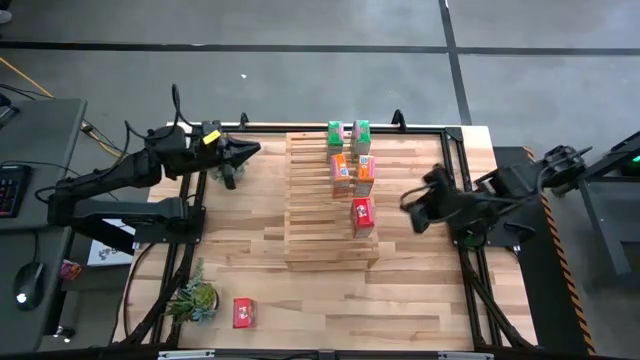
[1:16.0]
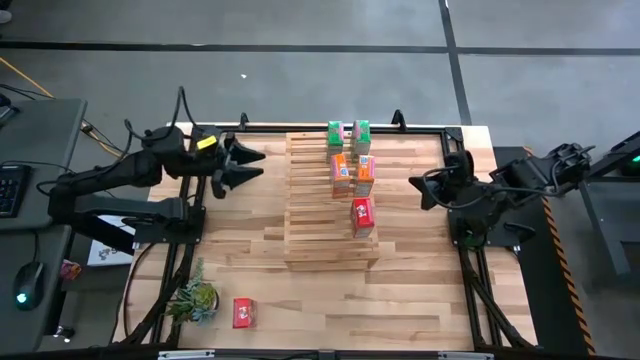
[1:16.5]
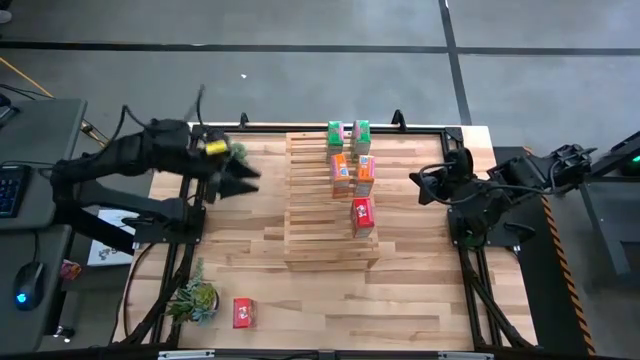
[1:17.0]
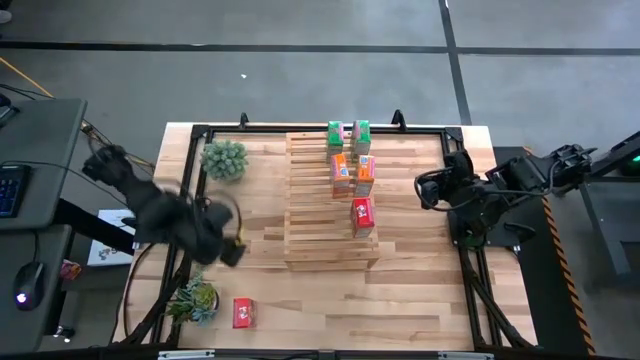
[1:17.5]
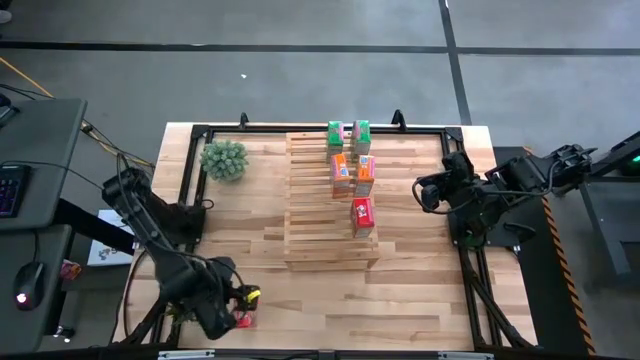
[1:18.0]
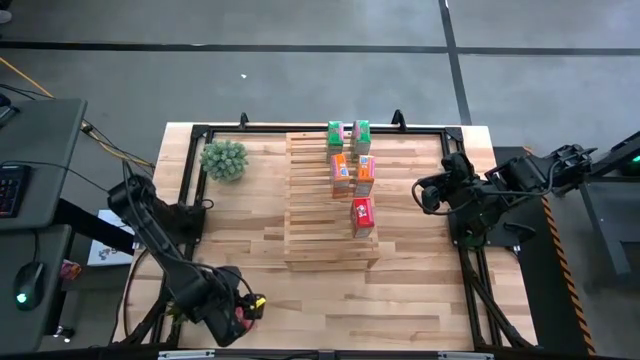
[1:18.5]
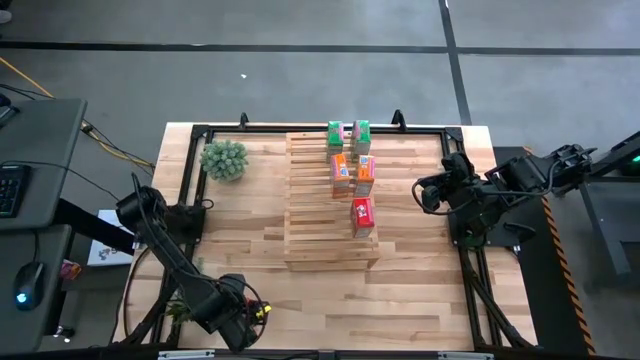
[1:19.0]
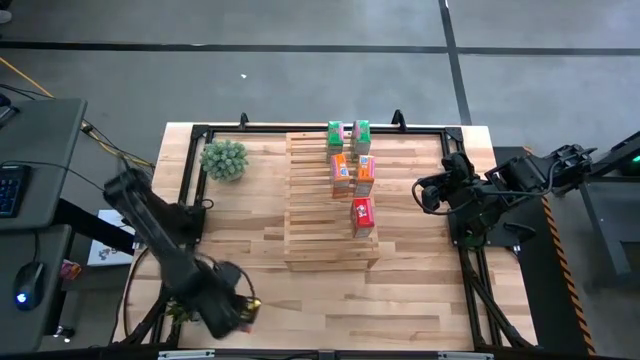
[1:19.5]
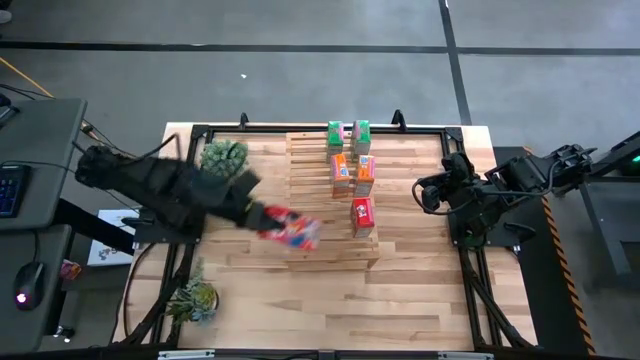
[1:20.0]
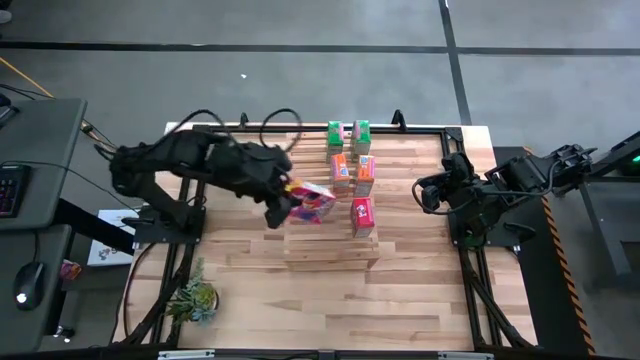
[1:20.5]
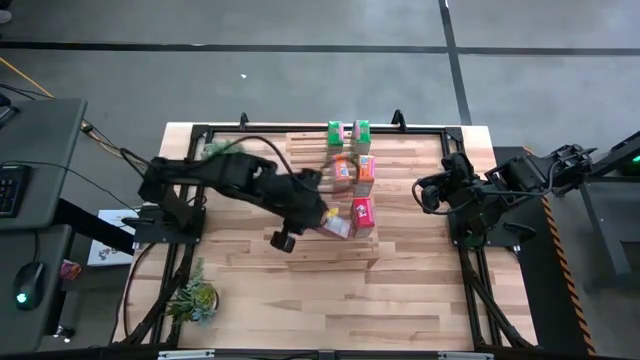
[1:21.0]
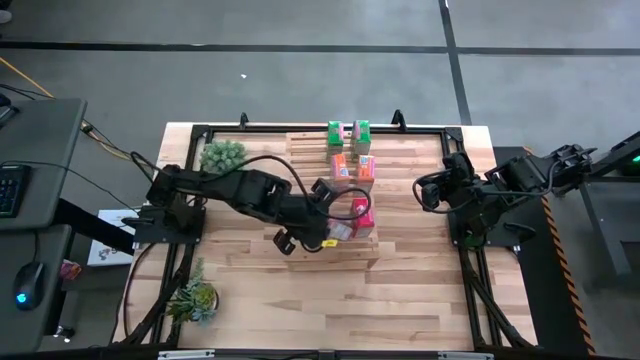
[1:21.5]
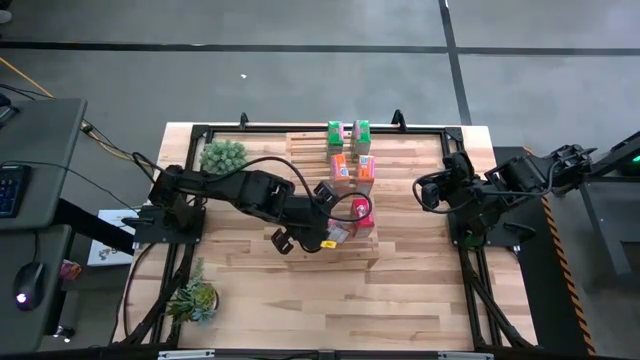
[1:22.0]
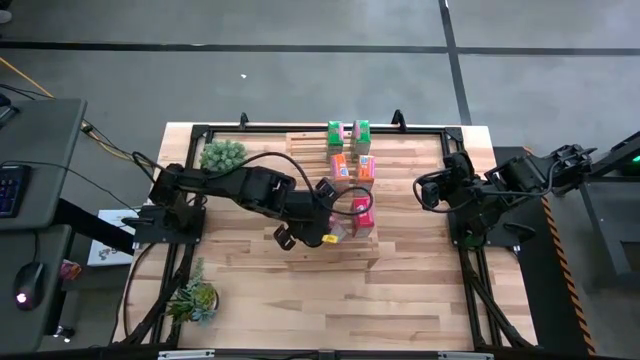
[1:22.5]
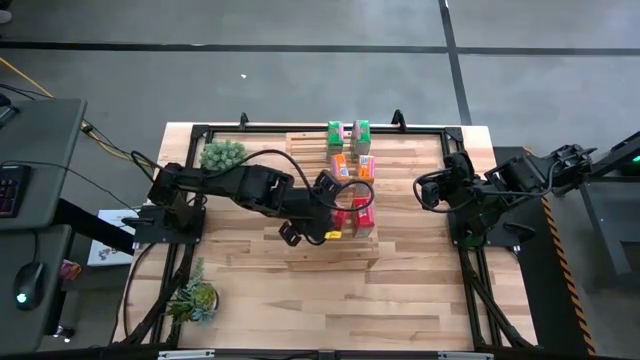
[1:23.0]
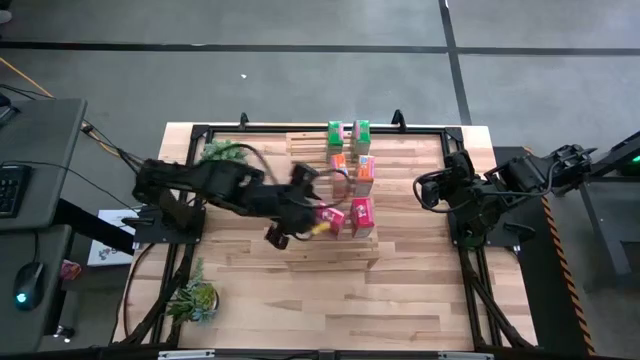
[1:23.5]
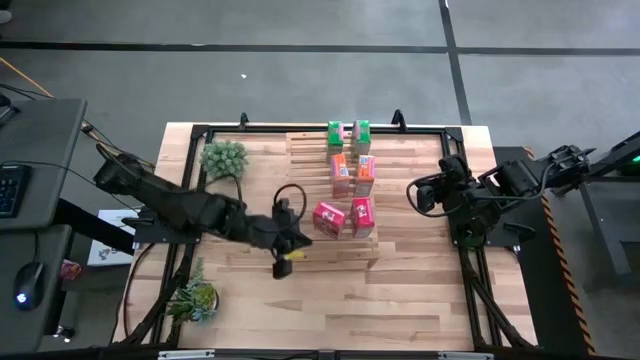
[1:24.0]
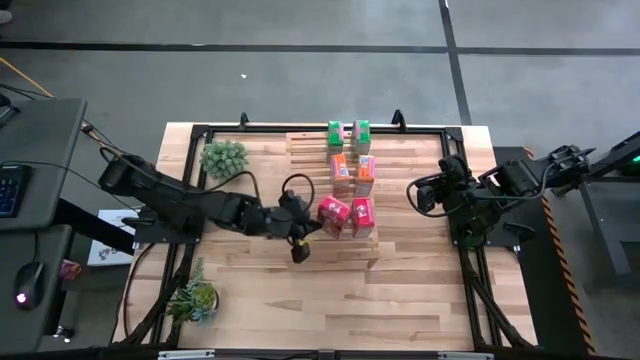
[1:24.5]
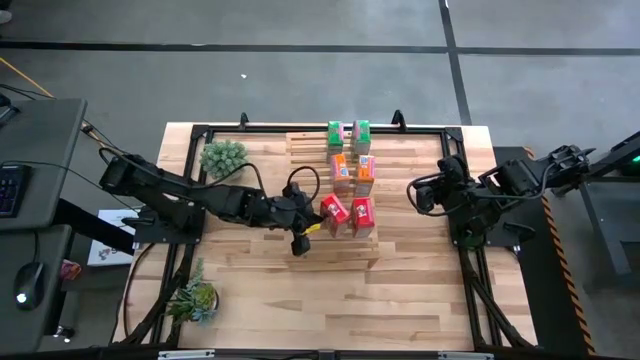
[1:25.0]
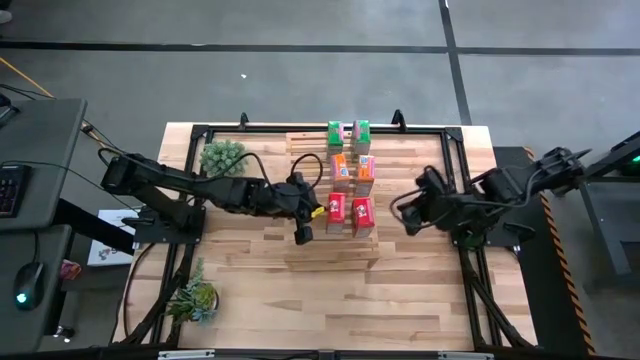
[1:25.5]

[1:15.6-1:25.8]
Task: Stack cereal on shelf
Put the red cereal box on the shelf

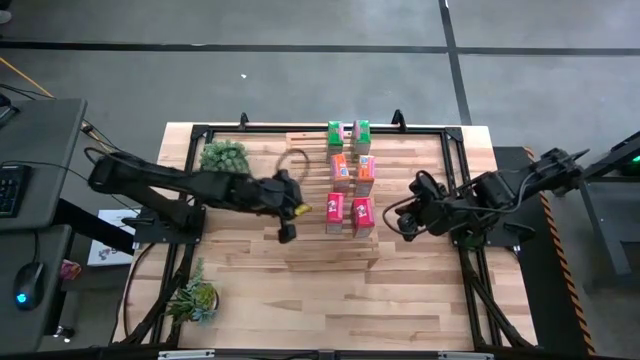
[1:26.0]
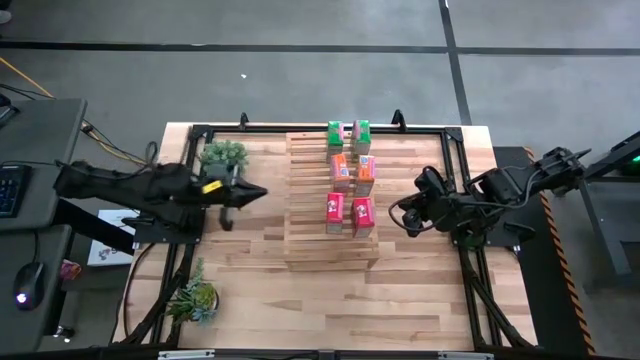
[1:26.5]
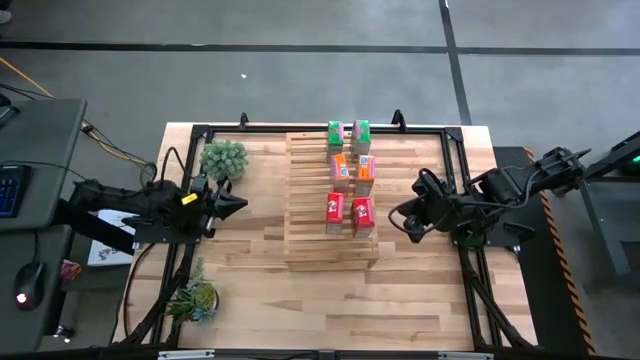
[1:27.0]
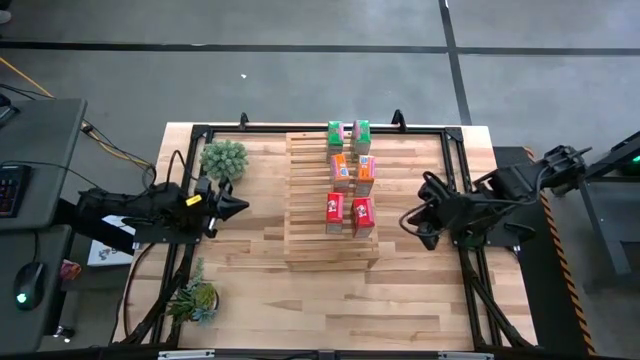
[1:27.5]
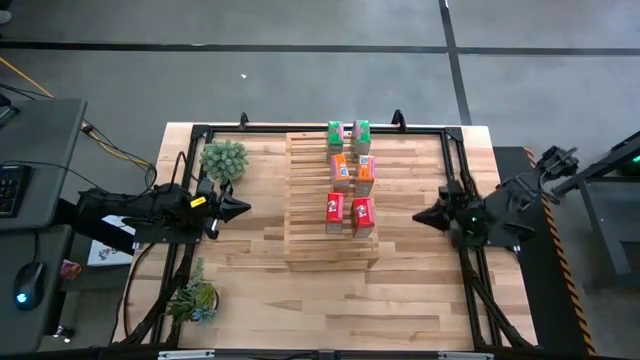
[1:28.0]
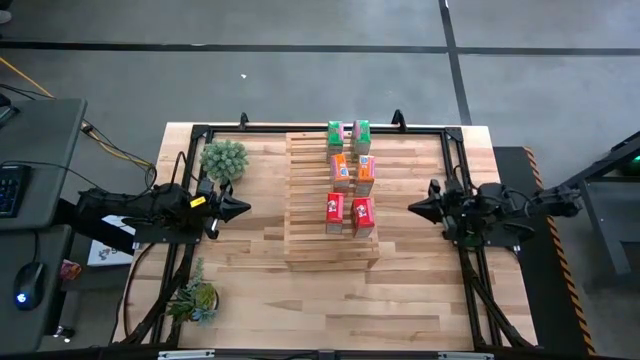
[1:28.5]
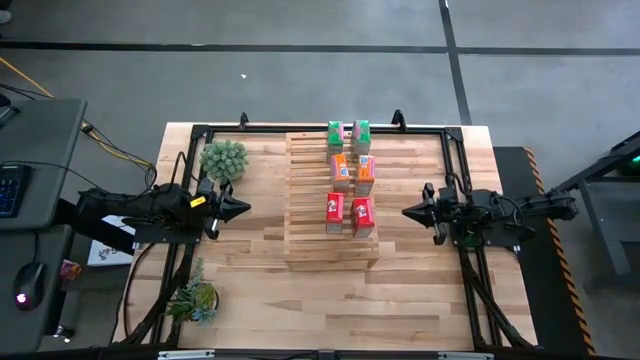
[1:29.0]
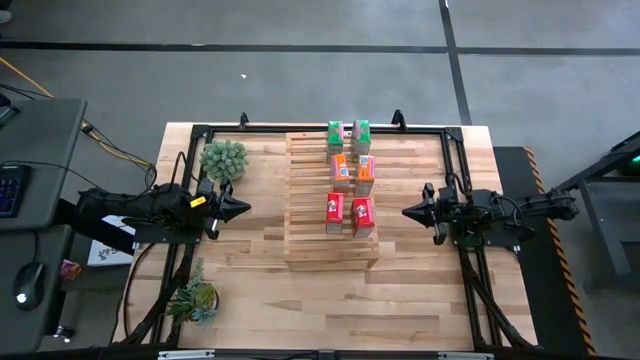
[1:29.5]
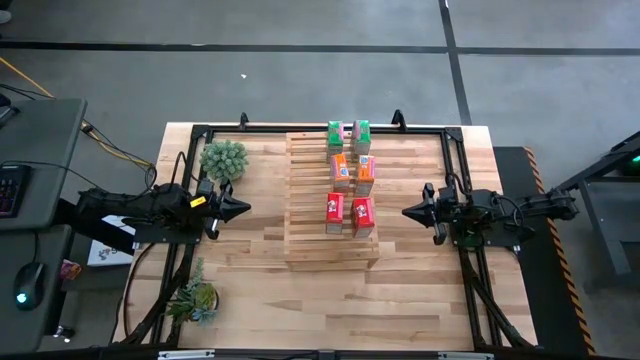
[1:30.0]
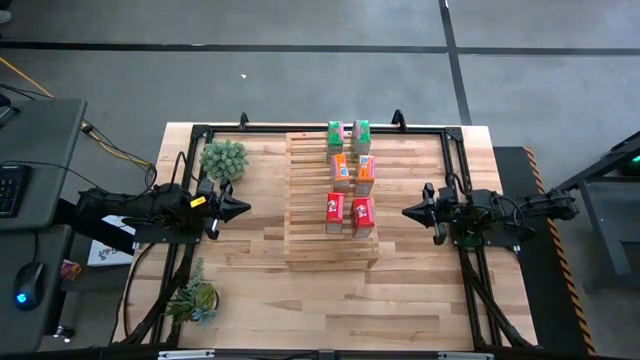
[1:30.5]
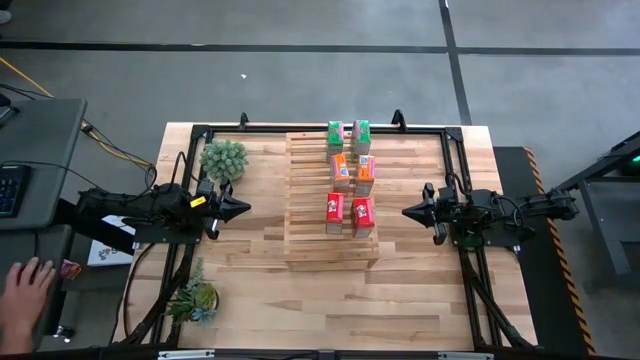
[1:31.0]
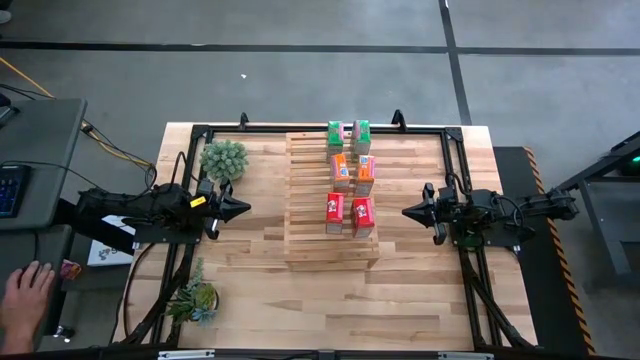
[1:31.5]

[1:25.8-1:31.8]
Return to Home Position

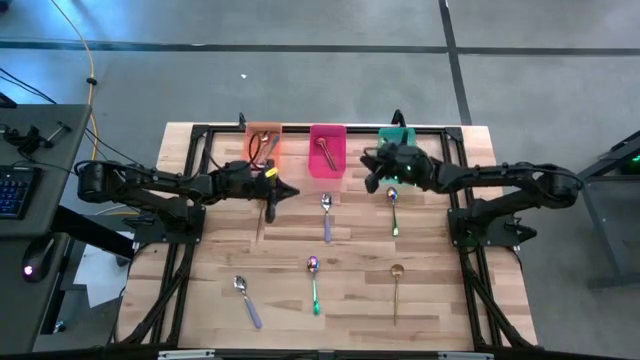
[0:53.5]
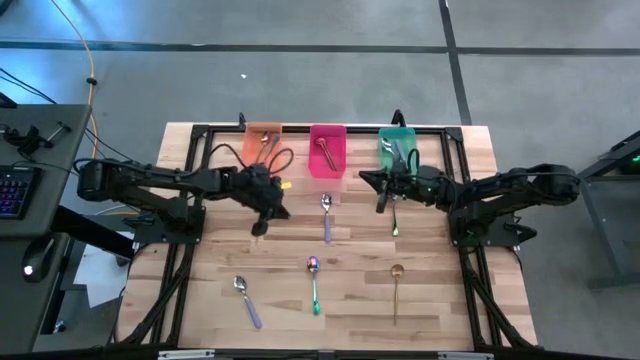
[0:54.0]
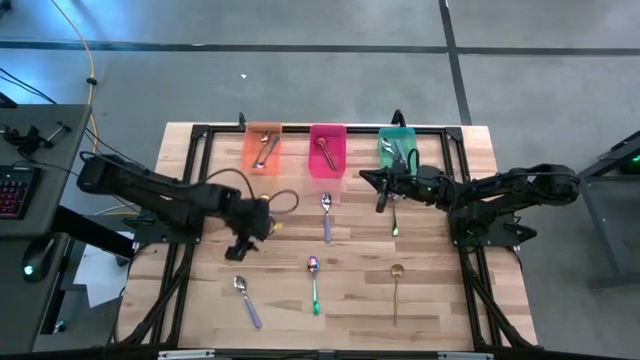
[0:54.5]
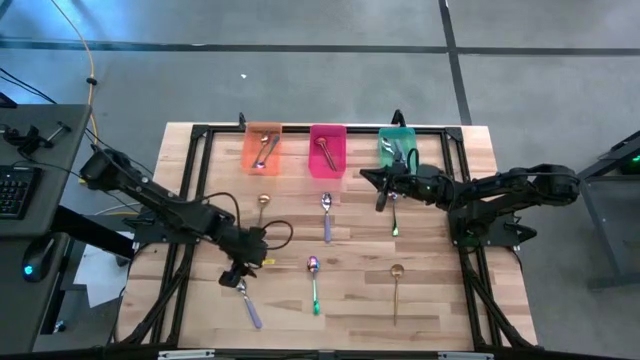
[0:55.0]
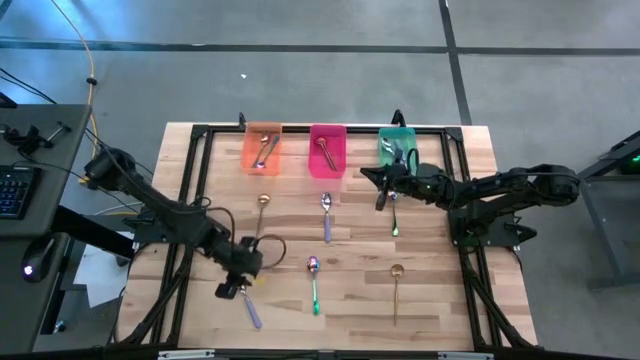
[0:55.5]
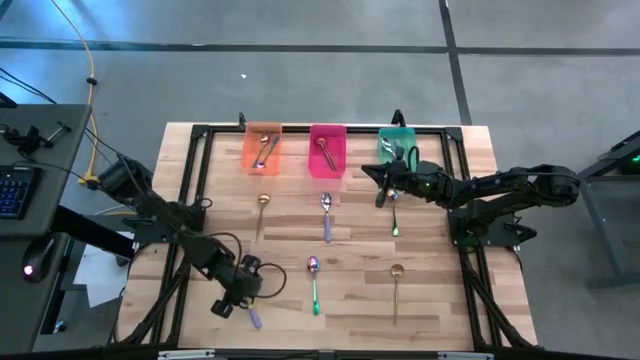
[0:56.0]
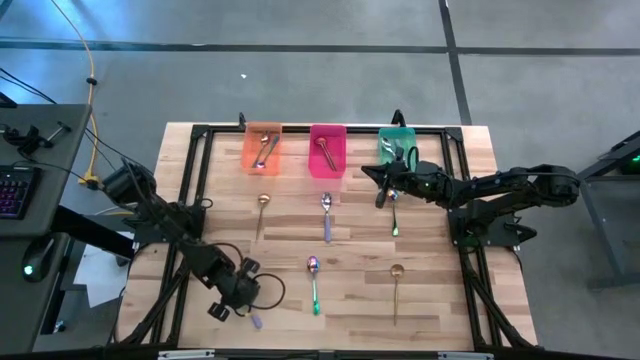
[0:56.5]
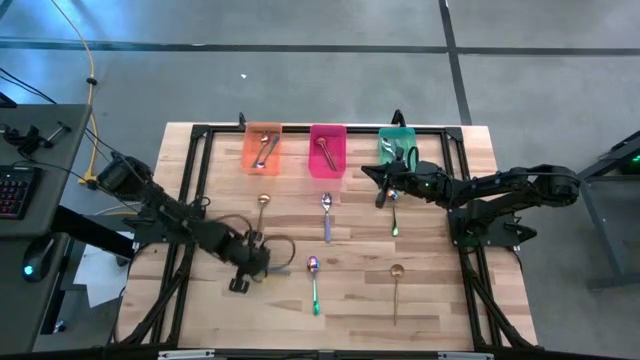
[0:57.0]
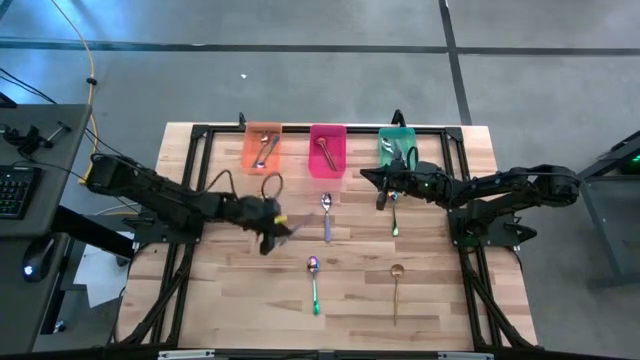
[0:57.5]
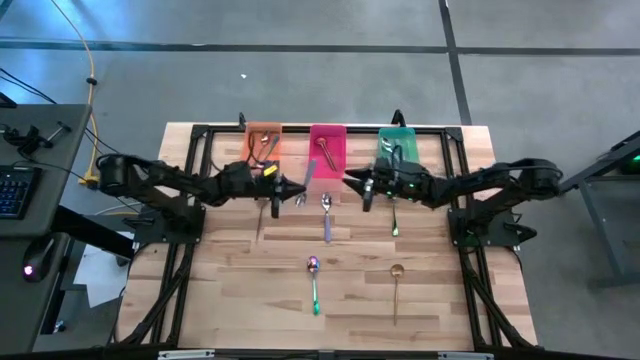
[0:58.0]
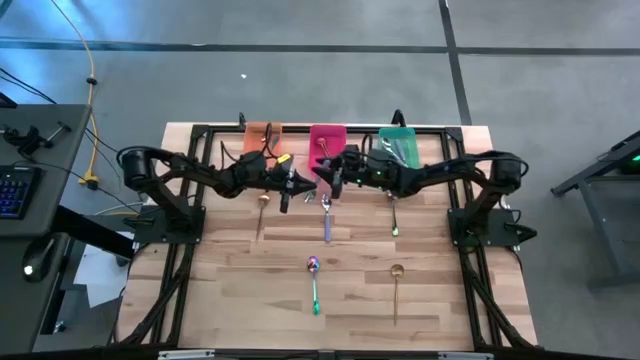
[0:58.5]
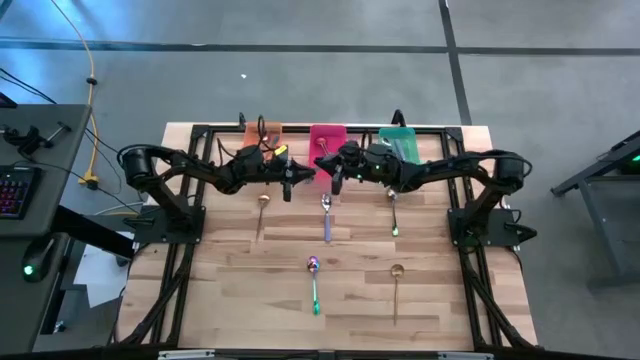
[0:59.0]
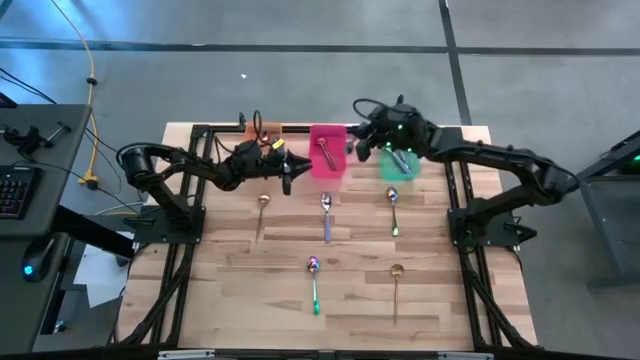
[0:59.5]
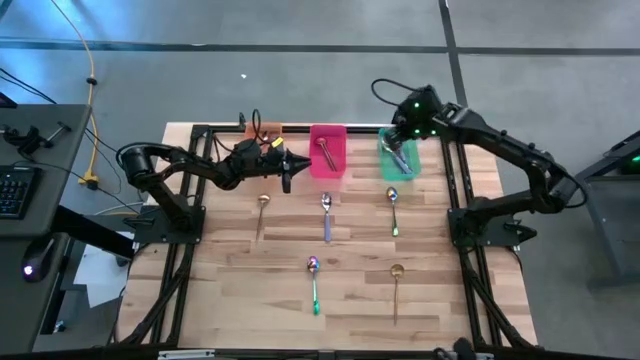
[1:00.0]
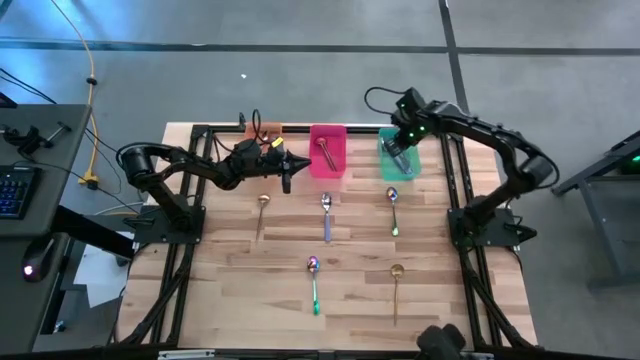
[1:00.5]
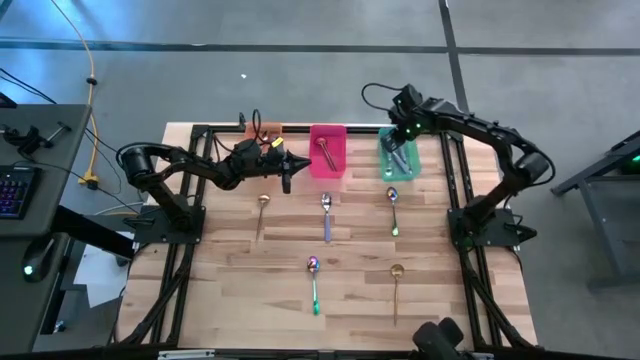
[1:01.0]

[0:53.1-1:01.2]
Task: Sort silverware by color (type)
Put the bottom purple spoon into the green bin
